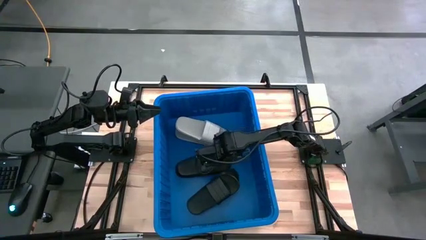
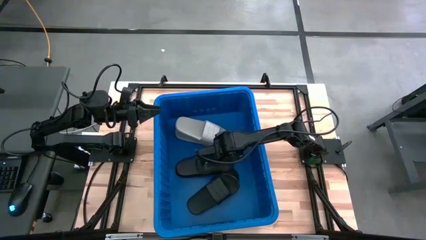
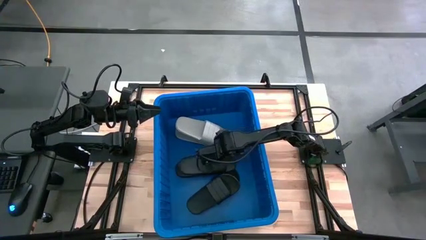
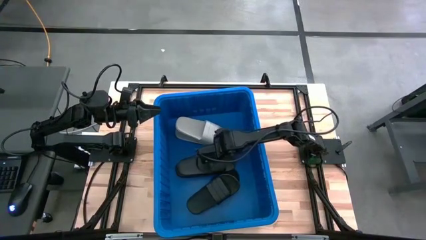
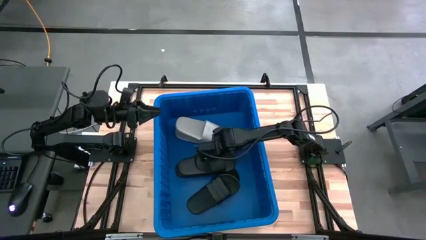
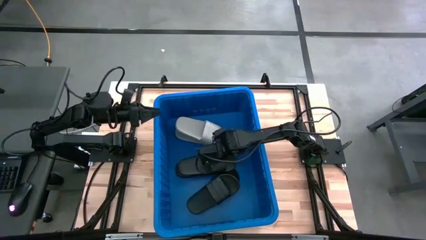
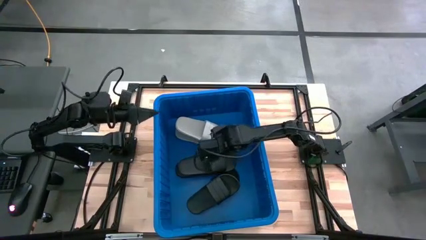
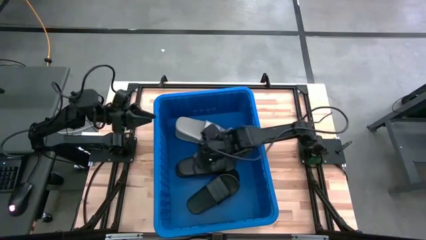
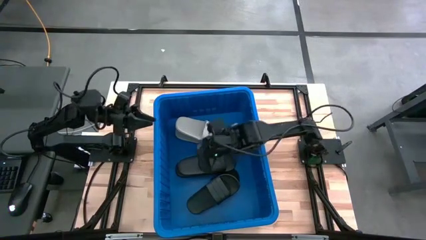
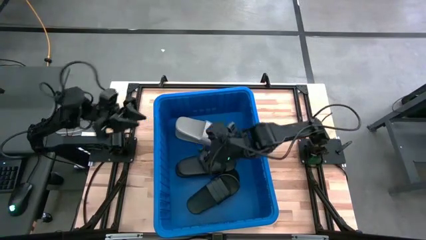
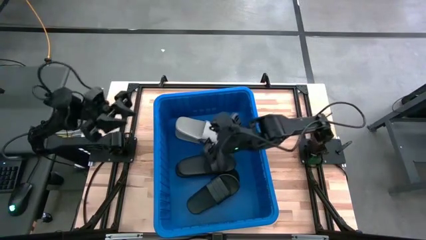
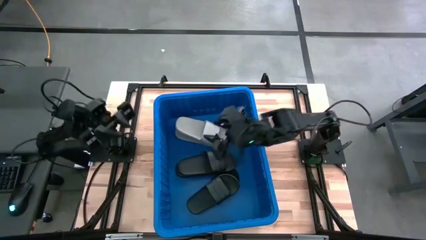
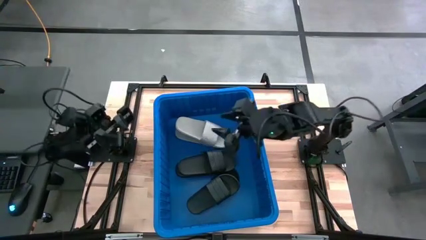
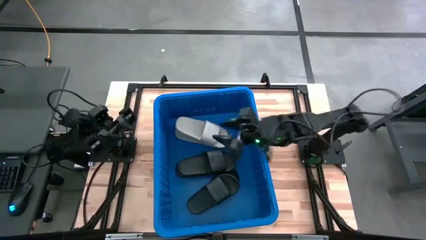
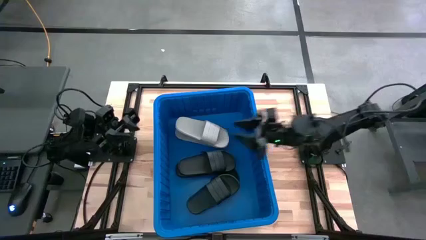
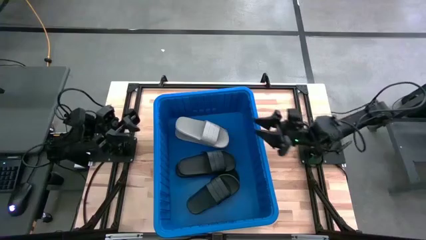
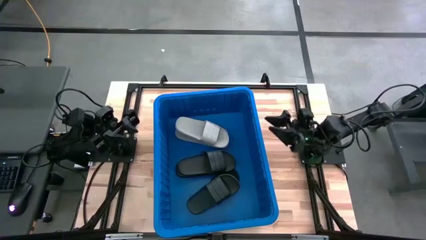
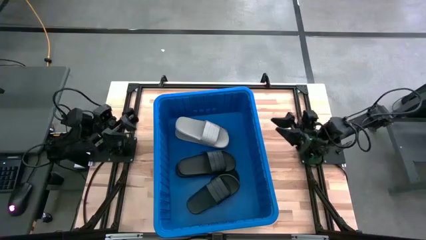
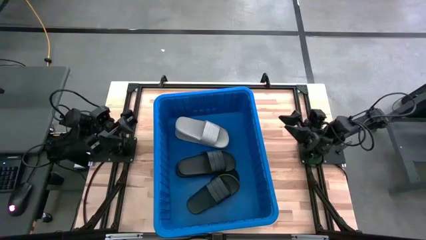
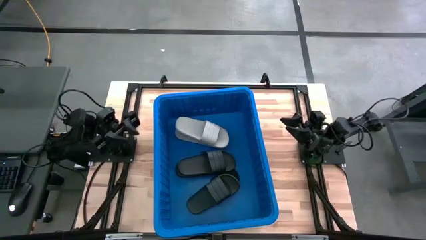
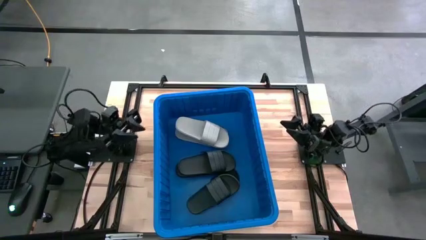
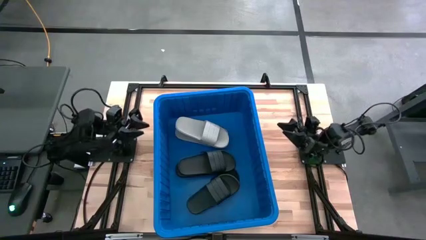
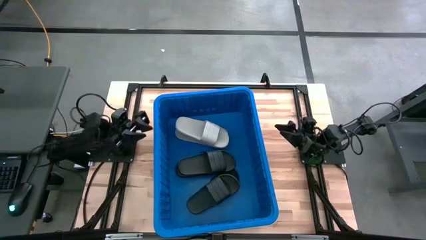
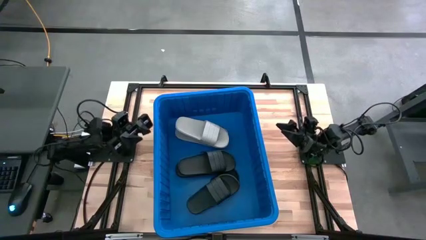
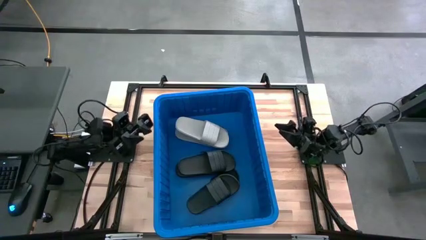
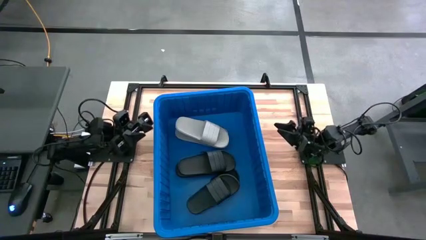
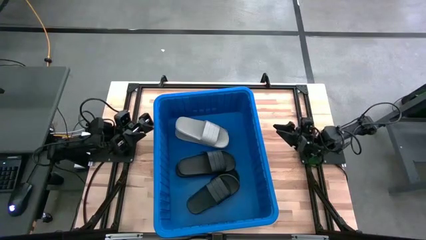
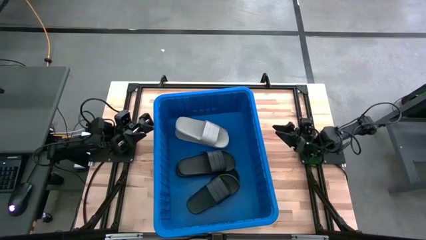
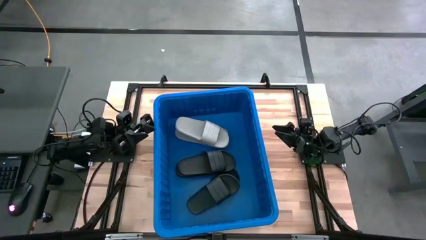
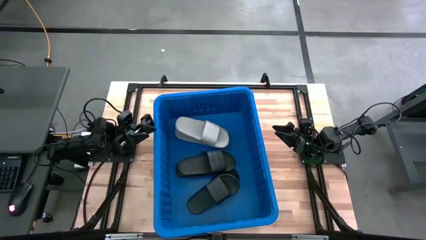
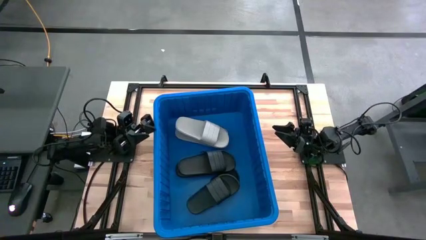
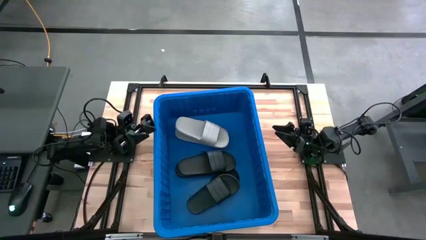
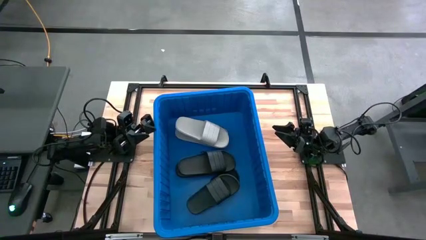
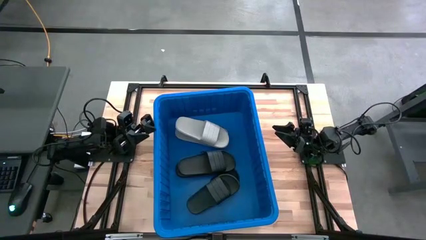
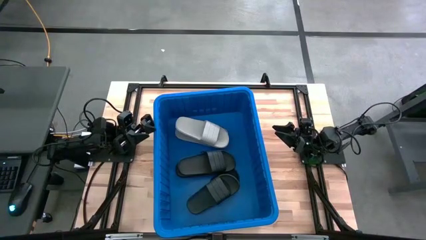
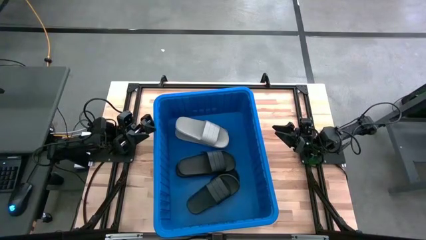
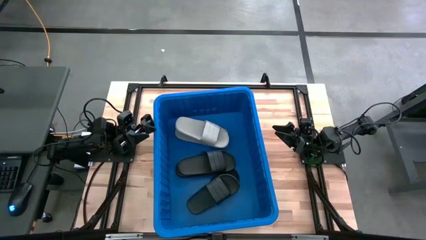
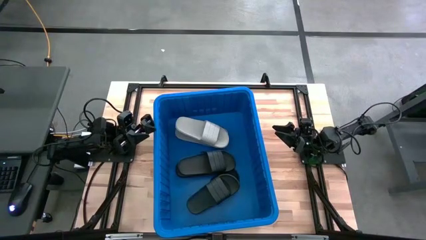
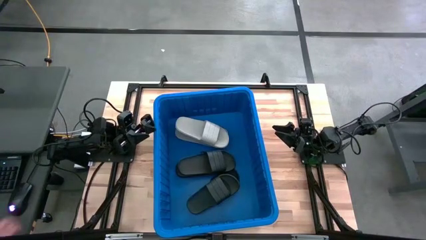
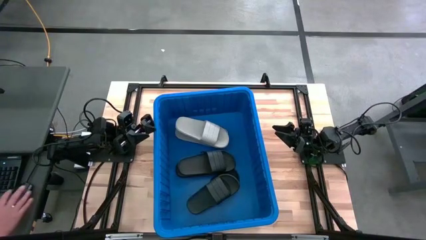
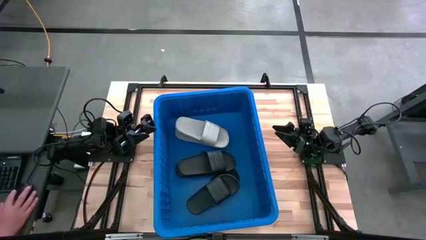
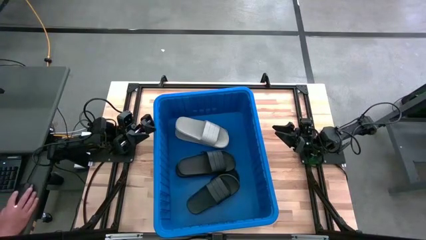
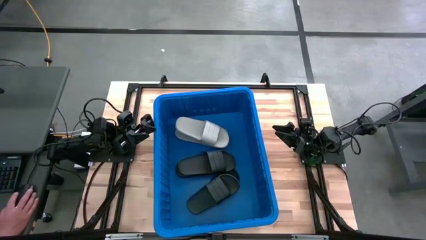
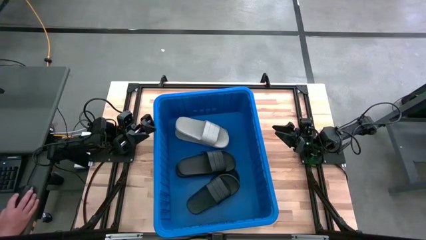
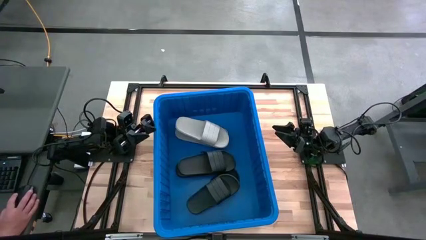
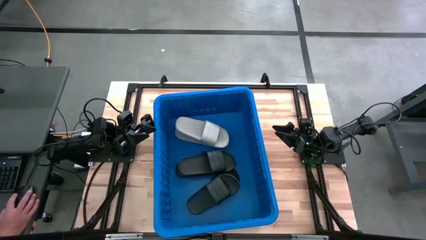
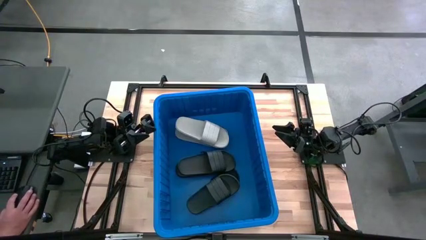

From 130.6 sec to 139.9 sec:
Task: Pick and place slides into bin
Return to Home Position
